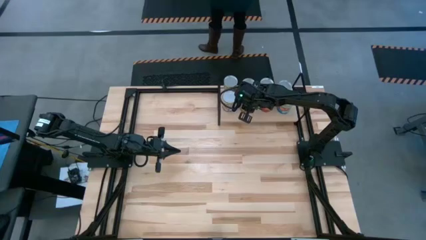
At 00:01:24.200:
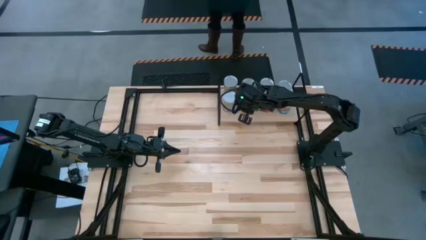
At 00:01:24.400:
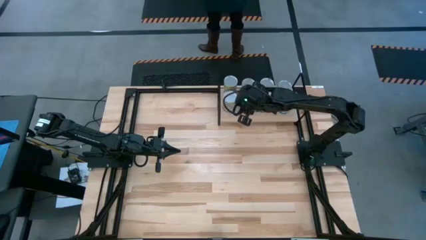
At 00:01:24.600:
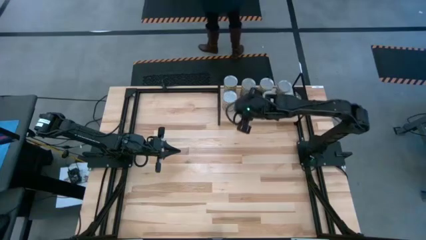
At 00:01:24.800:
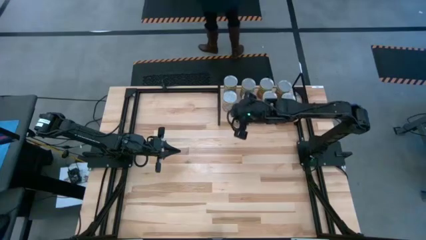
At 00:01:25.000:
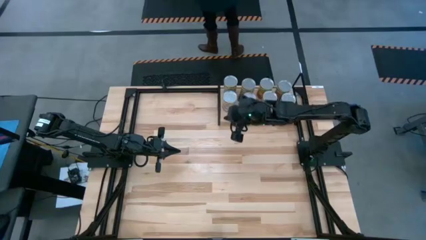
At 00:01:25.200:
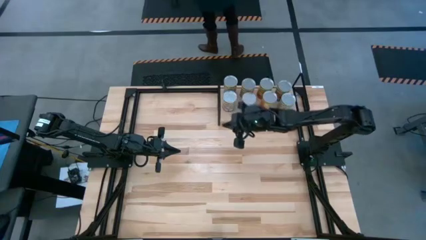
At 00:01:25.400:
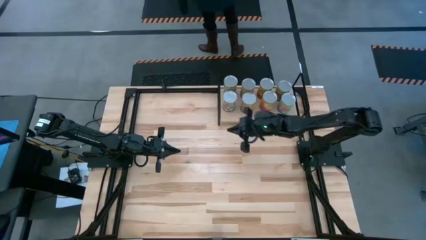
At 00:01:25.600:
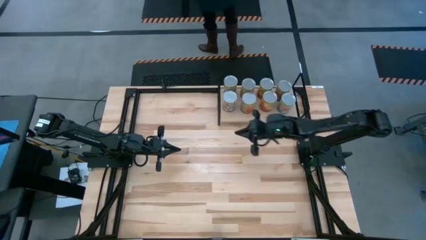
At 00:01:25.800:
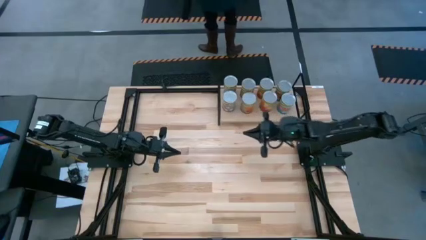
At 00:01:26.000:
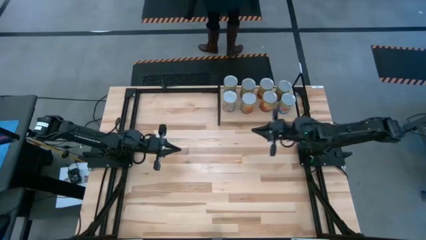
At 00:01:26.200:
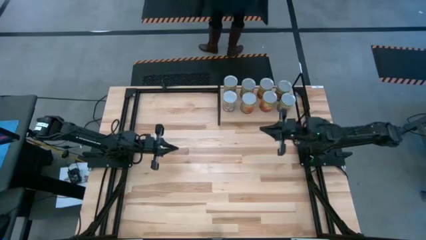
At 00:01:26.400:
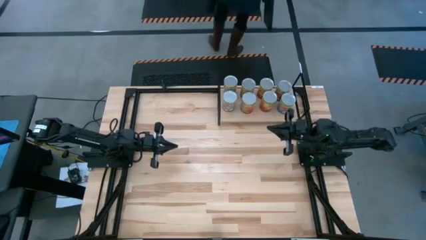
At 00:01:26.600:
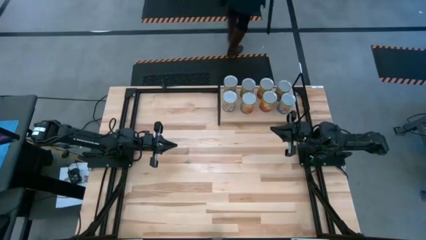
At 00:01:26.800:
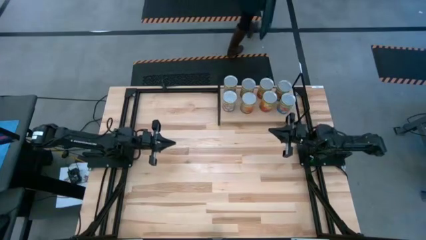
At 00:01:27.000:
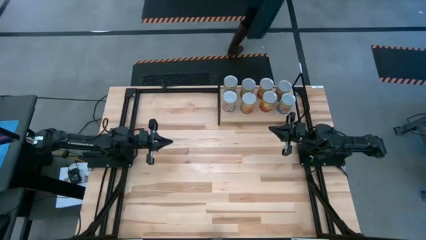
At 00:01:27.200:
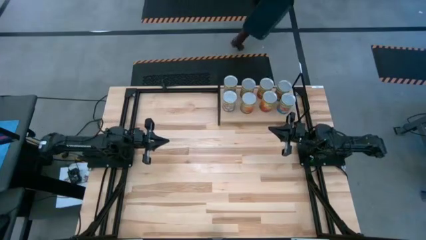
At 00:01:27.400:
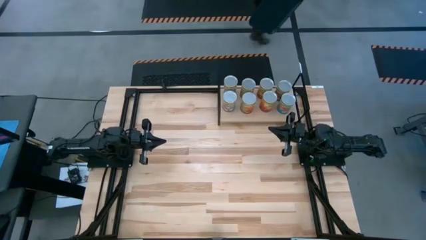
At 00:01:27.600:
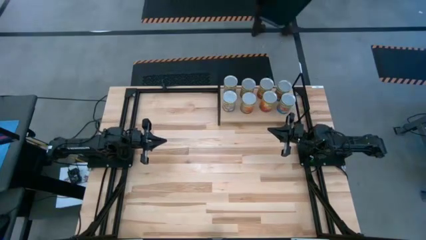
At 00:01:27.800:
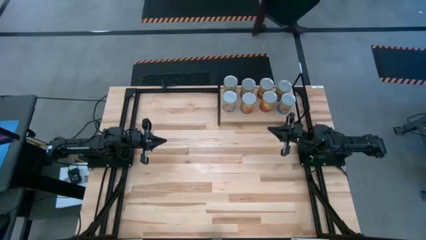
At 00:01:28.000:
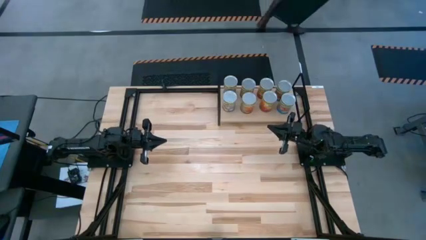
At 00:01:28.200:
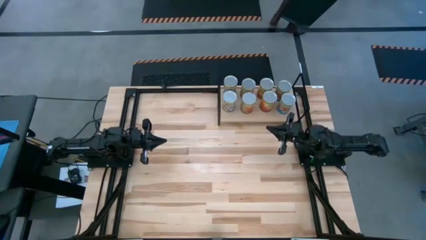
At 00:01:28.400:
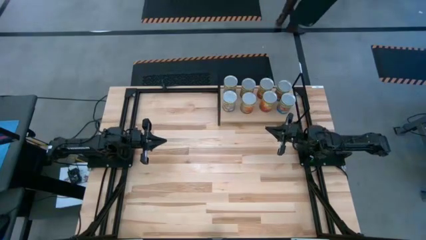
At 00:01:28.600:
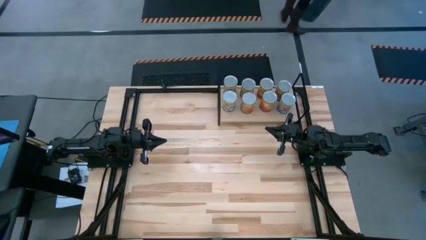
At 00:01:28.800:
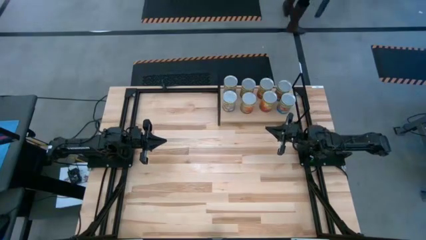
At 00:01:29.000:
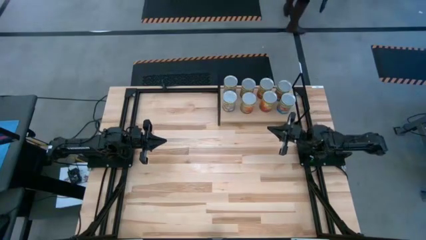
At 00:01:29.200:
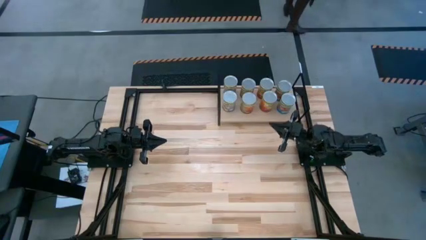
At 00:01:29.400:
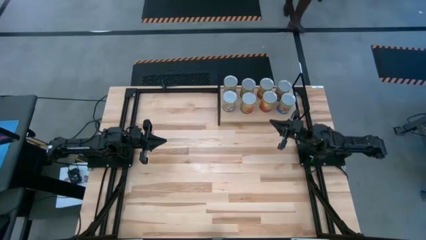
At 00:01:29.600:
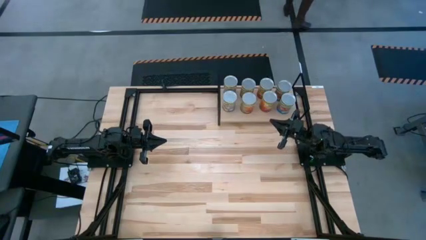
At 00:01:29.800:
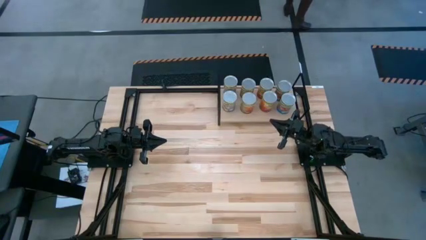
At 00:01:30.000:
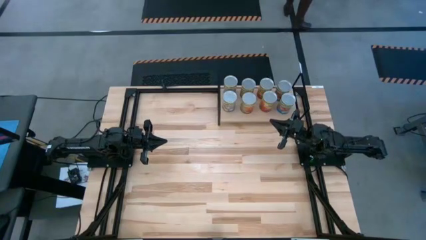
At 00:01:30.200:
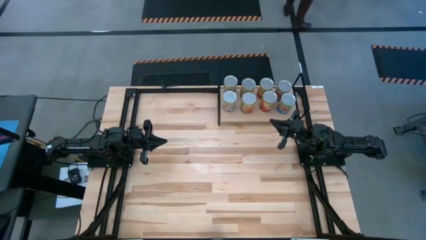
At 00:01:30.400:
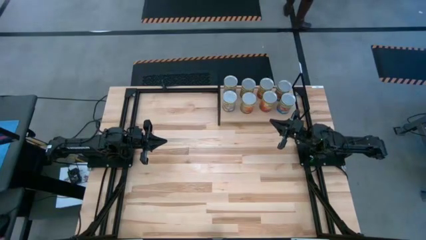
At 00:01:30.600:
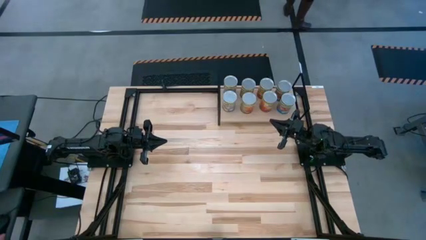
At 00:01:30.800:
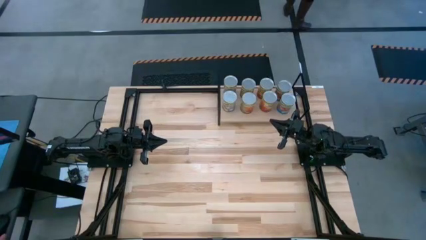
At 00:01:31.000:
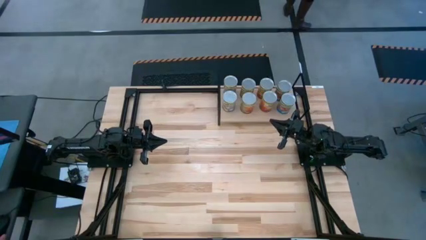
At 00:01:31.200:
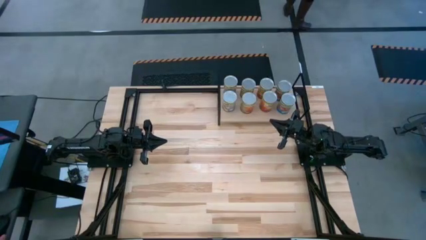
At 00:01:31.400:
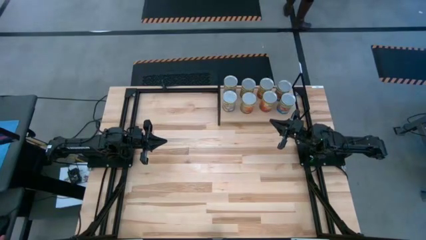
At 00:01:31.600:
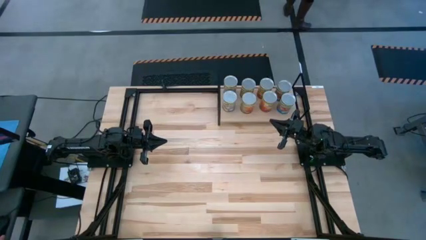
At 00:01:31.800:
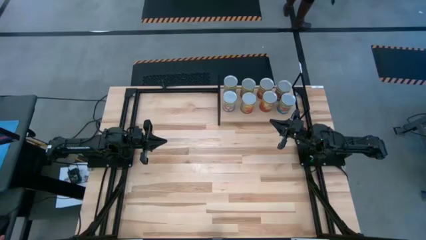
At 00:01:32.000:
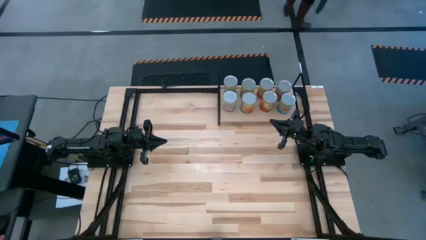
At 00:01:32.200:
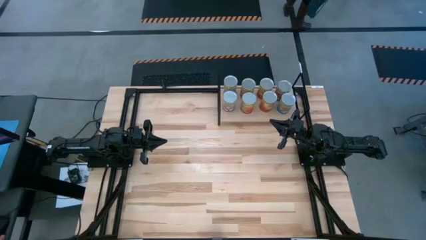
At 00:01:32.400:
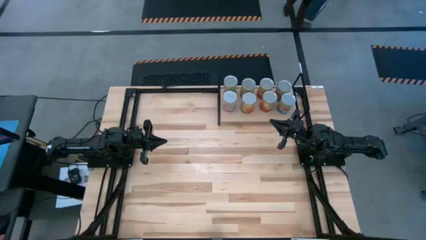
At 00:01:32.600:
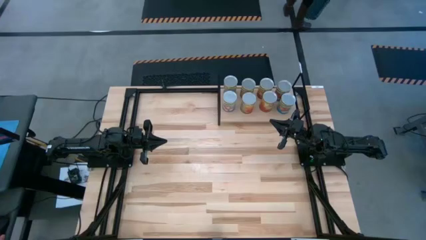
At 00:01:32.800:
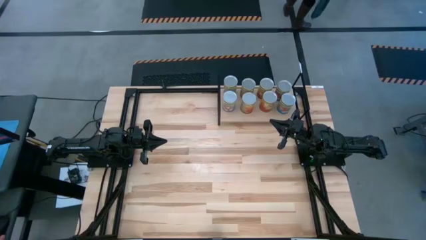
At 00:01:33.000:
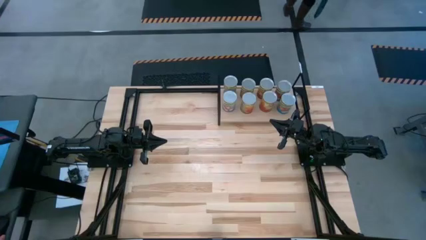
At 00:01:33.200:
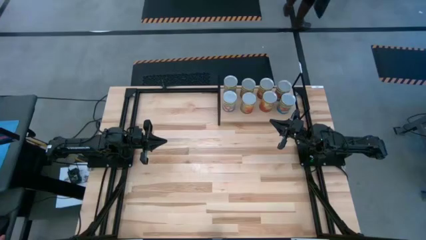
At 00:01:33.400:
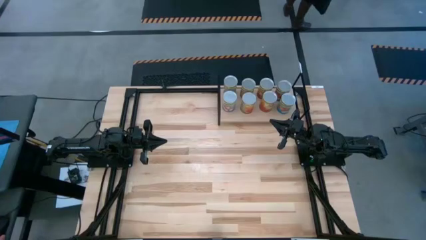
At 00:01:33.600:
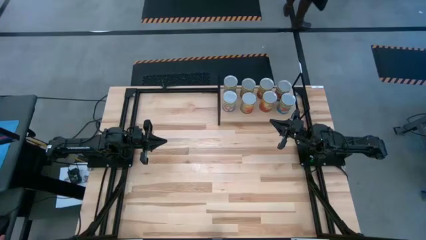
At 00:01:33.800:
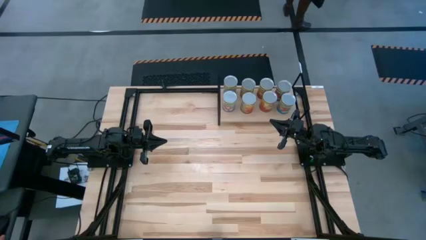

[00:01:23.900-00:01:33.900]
Task: Pick and place cans onto a shelf
Return to Home Position

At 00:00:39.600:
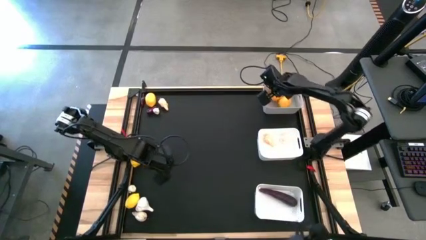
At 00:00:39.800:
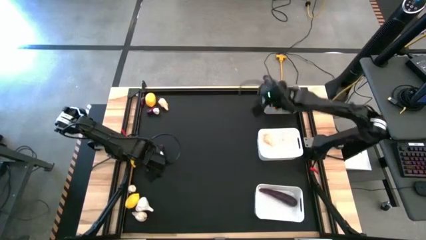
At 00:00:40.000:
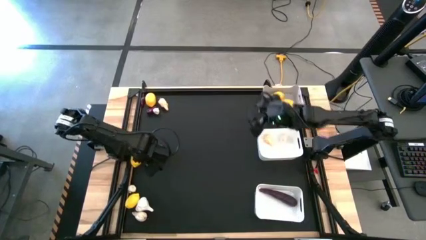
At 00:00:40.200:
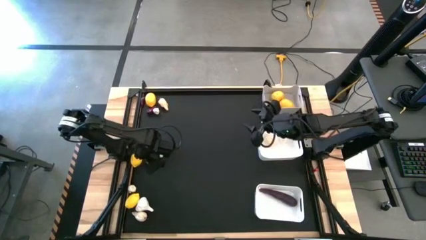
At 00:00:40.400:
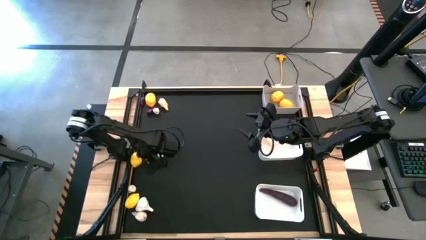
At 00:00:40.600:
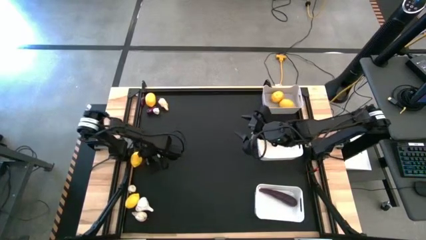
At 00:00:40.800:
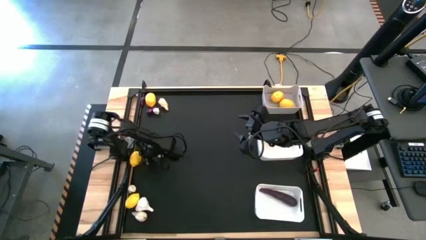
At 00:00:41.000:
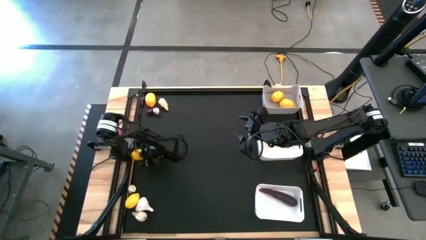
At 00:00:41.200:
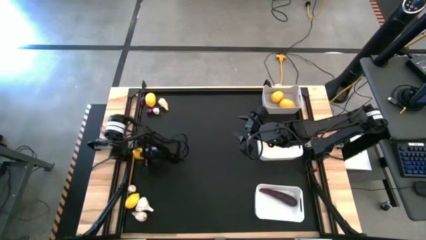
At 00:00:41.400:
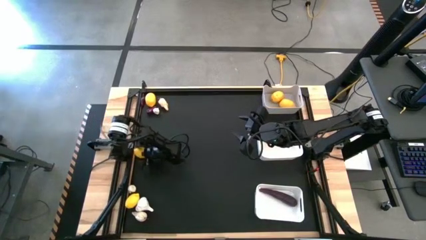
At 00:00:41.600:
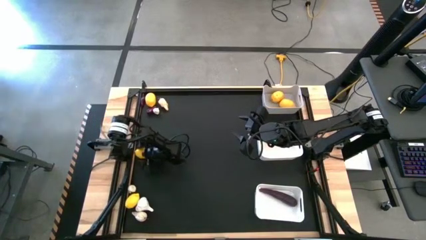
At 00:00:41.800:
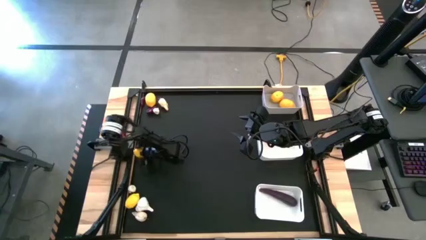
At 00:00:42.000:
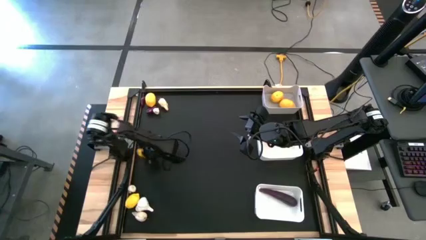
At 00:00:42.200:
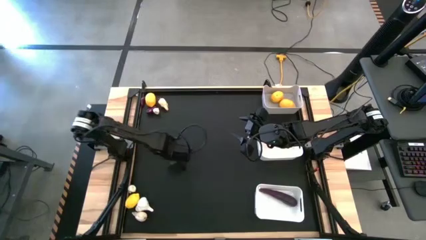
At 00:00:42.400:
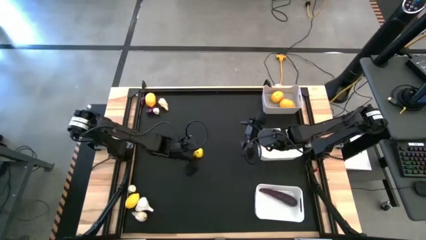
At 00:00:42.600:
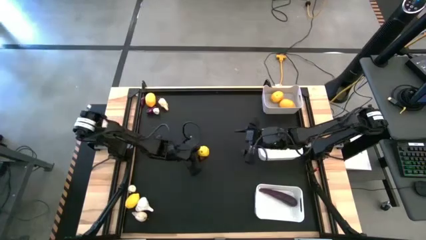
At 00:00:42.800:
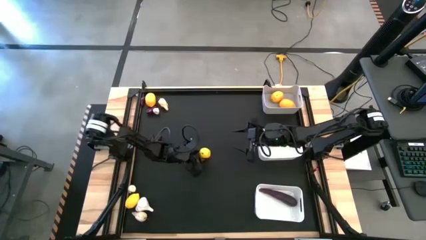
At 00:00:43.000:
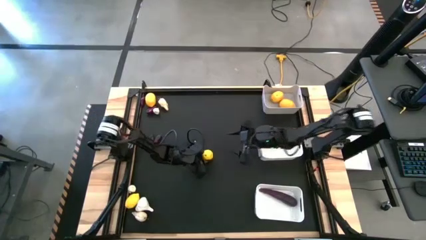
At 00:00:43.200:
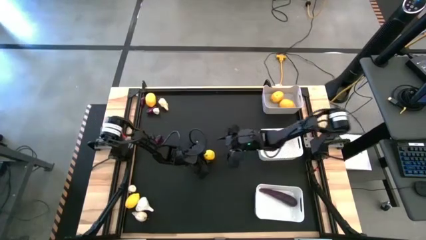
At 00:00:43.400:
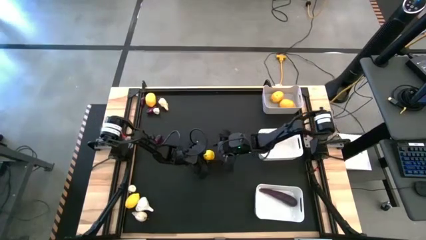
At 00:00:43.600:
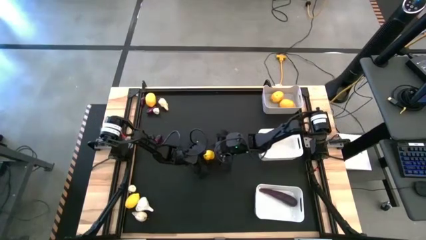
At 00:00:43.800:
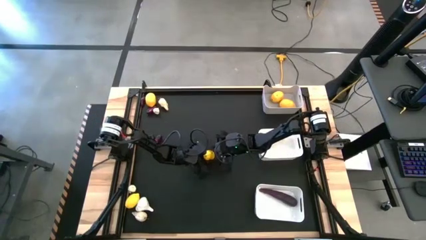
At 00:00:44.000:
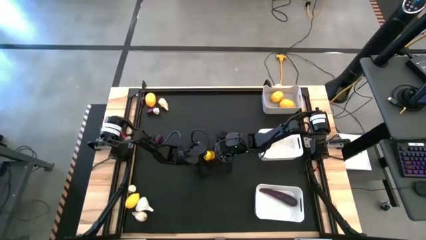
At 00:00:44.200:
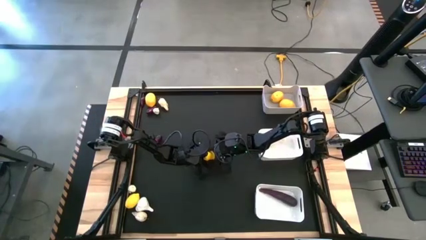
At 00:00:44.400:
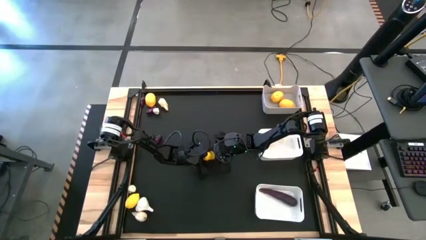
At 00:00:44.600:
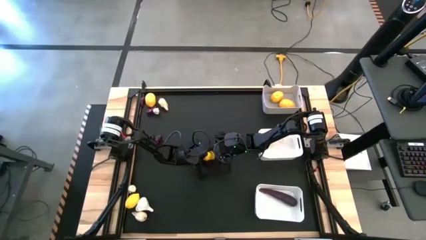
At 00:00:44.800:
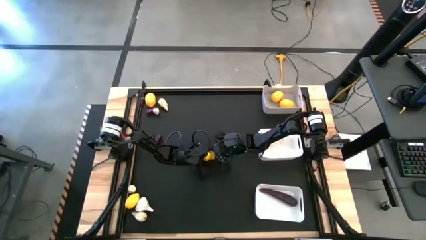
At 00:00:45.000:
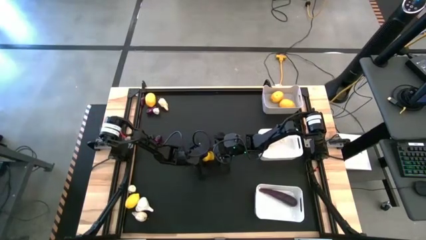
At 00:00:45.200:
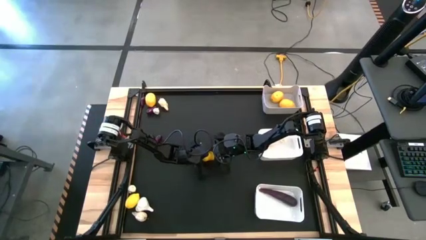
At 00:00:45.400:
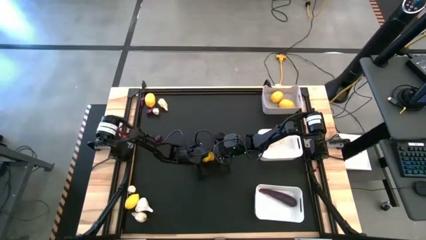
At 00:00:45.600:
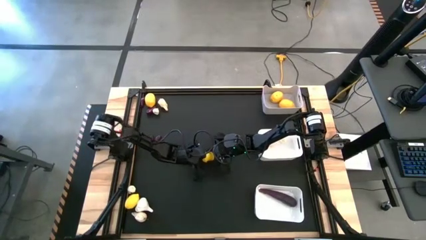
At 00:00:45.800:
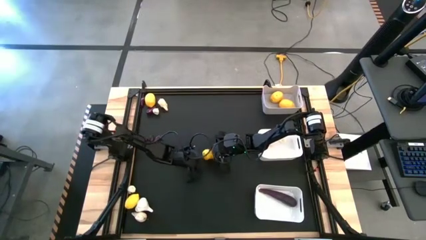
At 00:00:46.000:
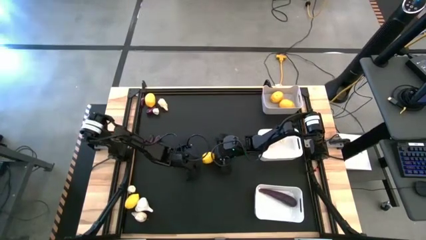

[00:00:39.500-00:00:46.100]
Task: Sort produce into baskets
Put the lemon into the gray bin
